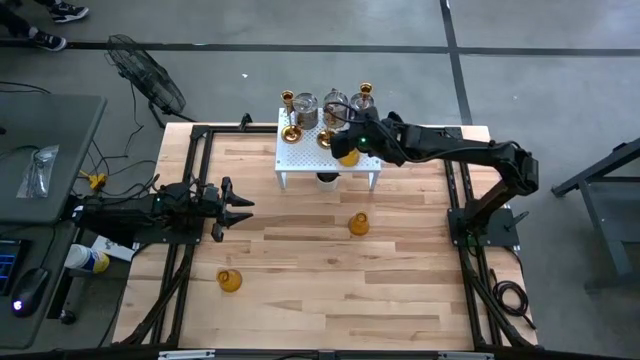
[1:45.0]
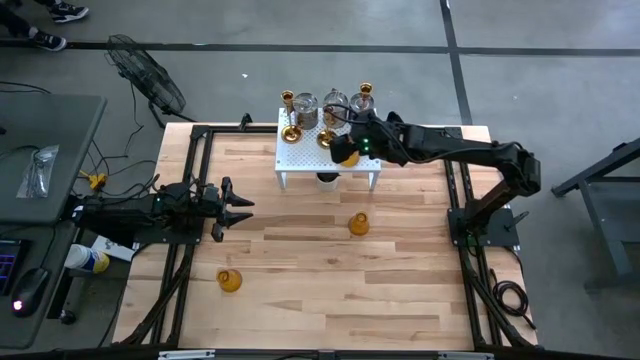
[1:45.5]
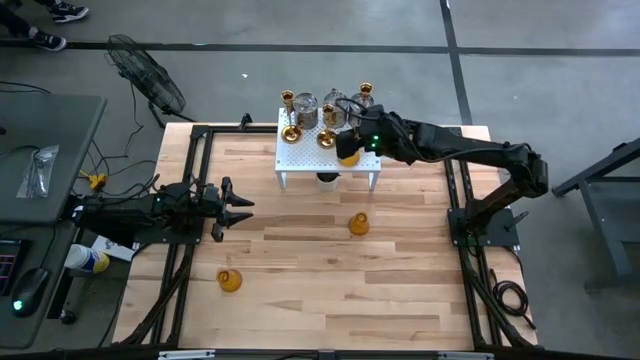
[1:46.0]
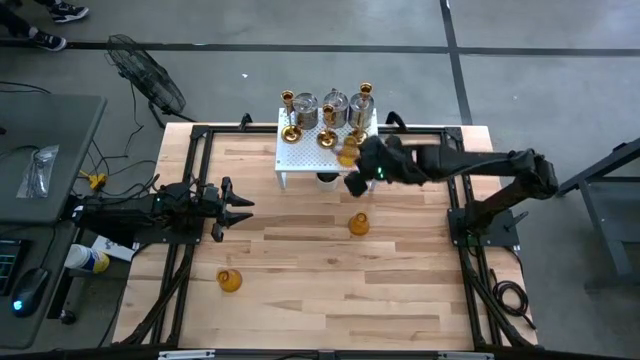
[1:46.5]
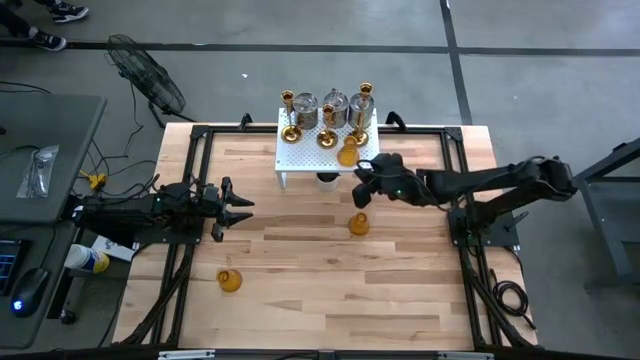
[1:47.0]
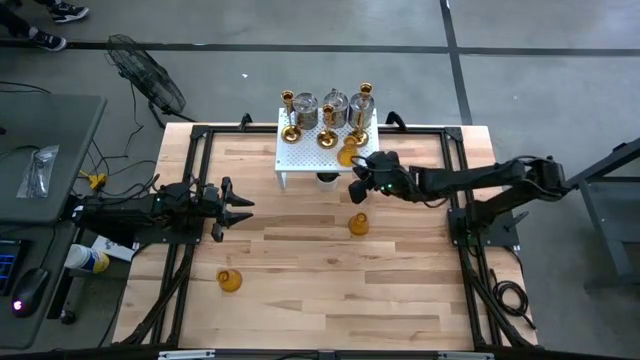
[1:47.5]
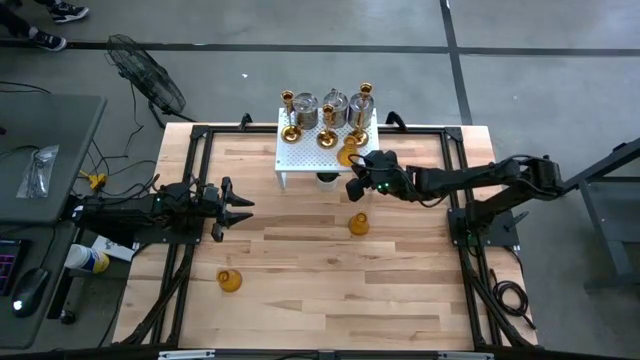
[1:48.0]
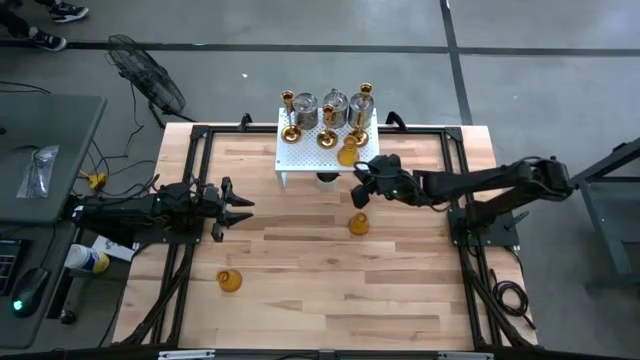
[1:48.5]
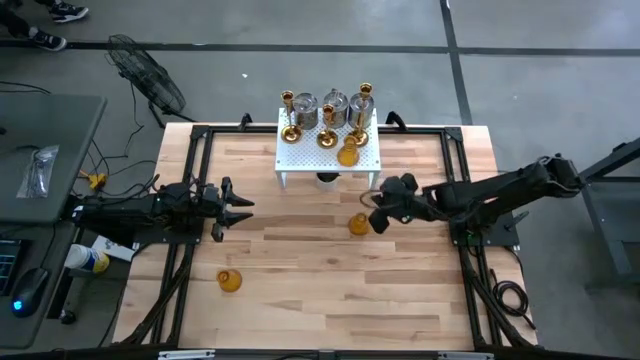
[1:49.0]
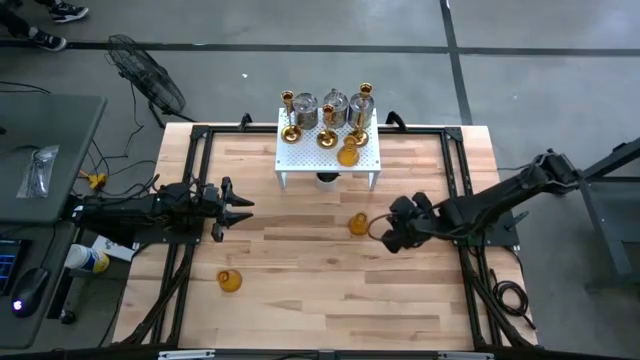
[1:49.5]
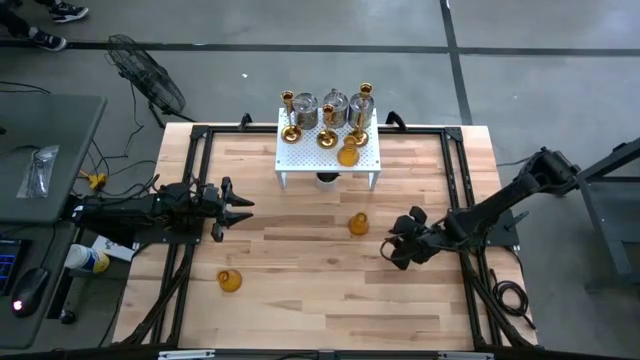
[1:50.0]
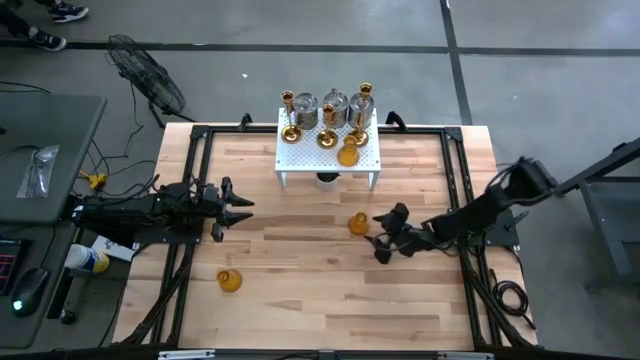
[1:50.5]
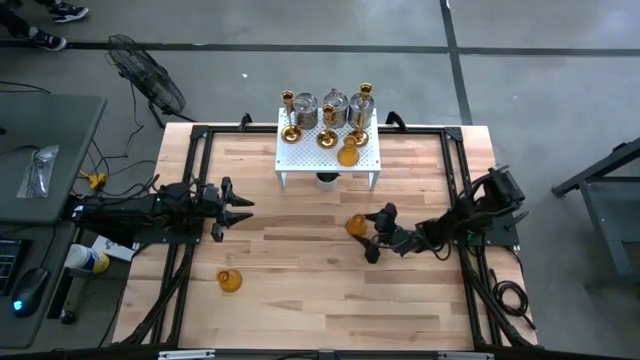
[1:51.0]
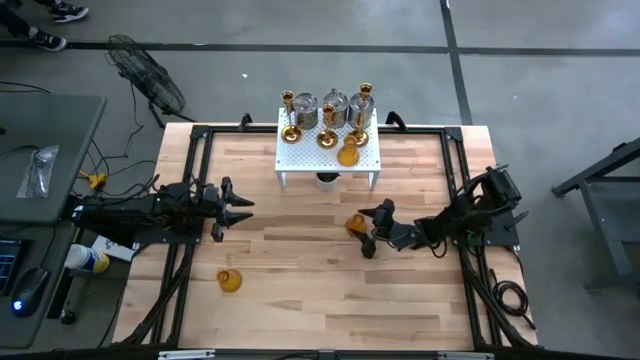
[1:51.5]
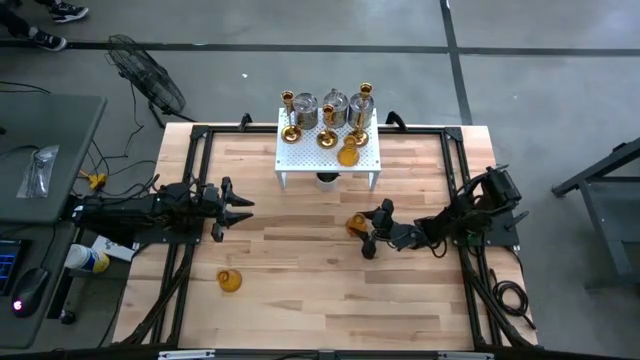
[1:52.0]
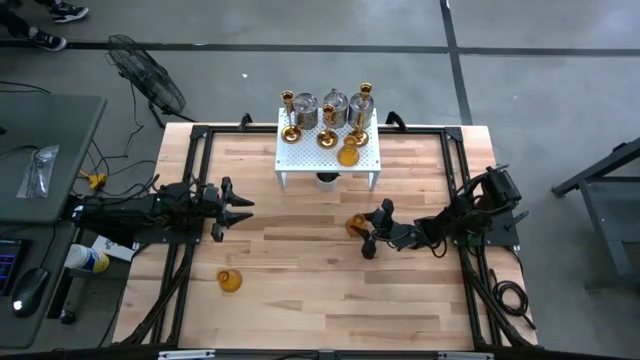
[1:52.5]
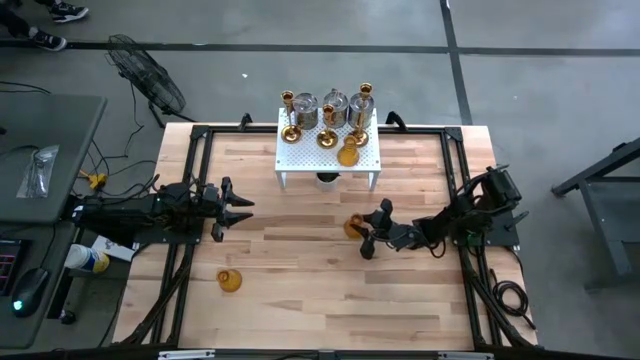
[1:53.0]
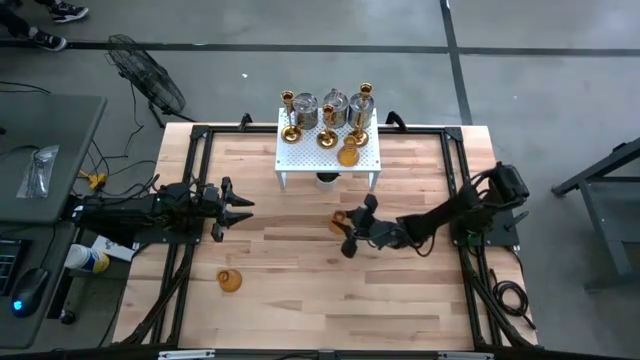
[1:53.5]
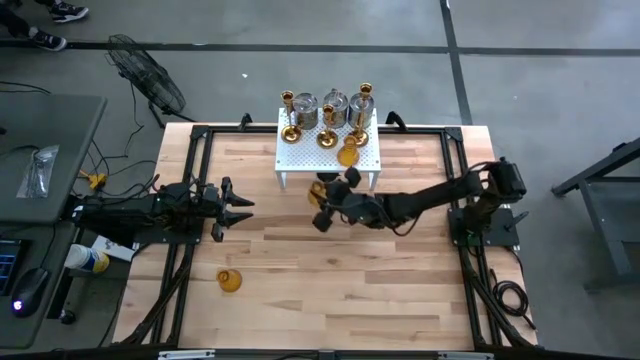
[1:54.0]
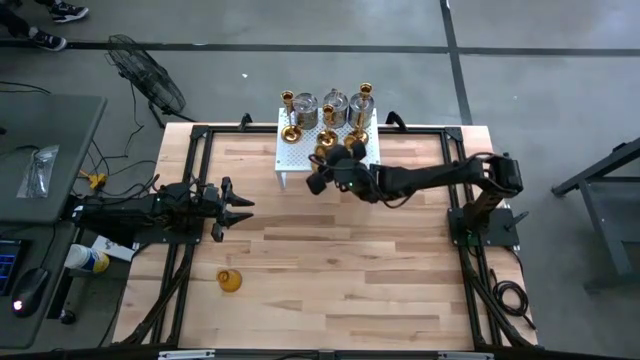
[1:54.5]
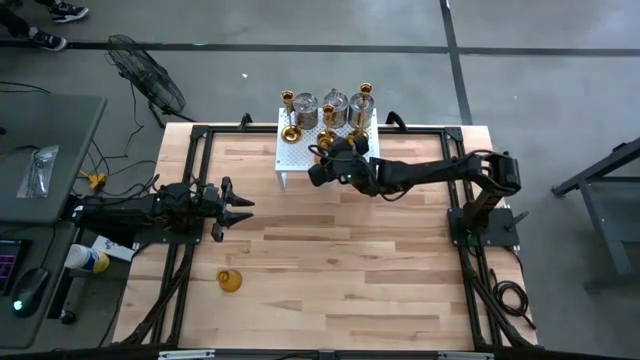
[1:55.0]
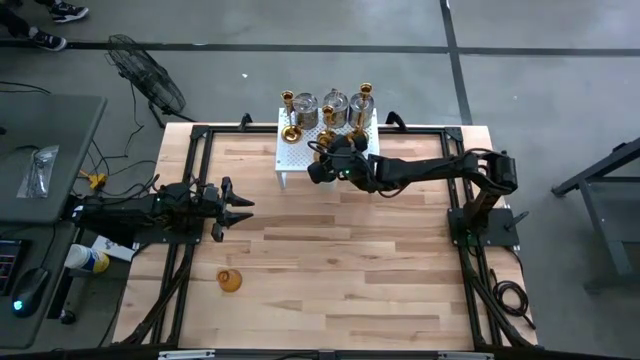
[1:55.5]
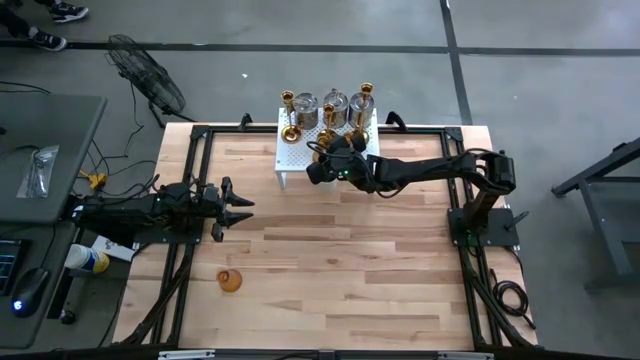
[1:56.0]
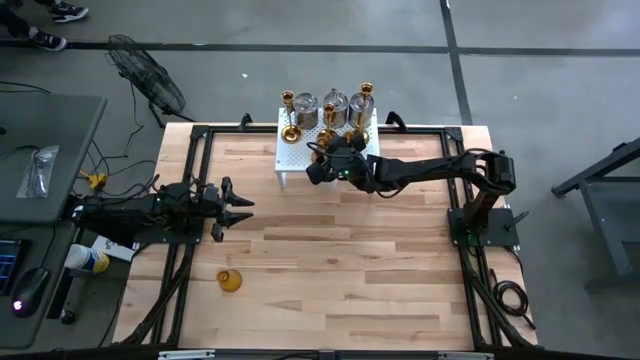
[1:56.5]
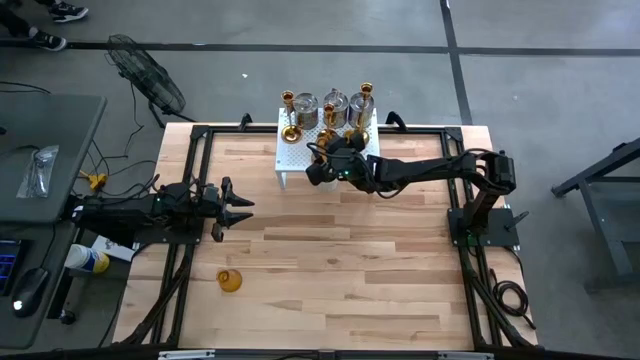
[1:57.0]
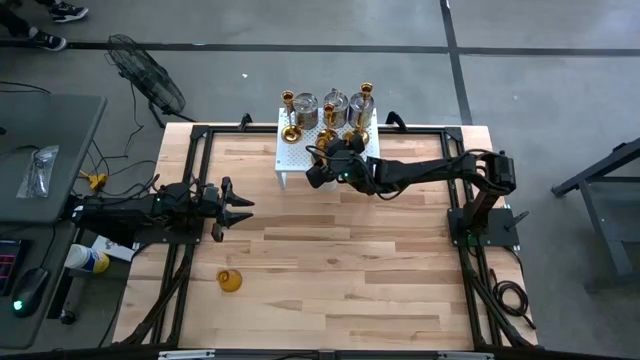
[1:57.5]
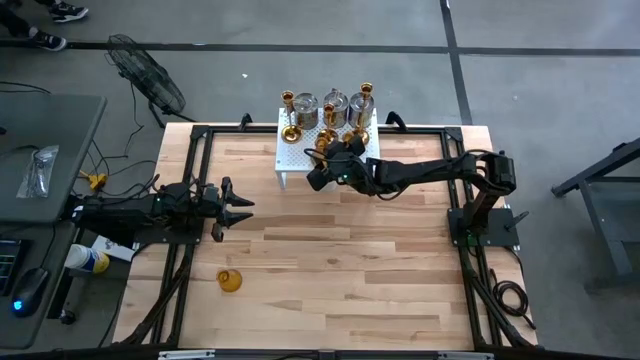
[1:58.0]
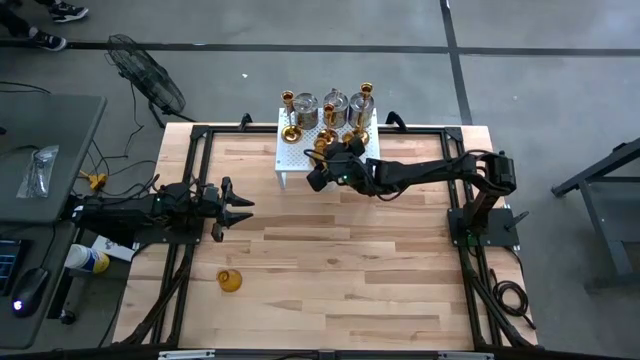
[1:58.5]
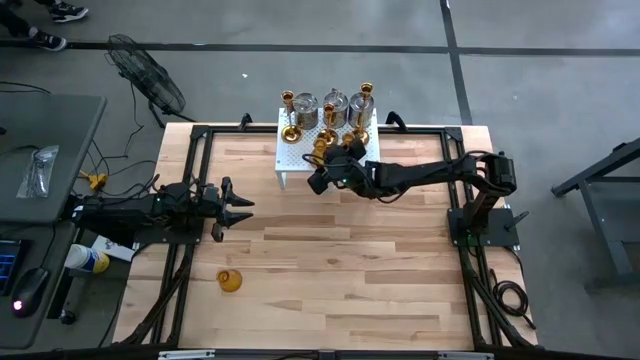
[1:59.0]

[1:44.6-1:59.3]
Task: Pick & Place candle stick holders
Put the middle right gold candle holder on the shelf
